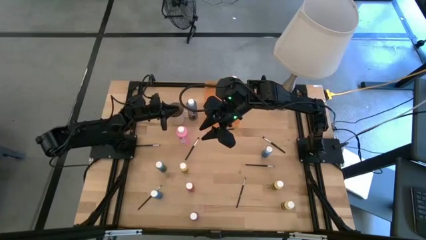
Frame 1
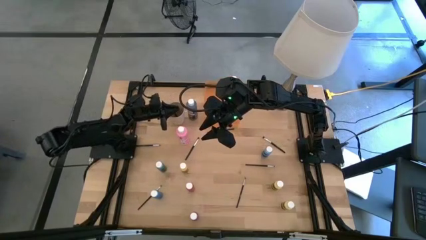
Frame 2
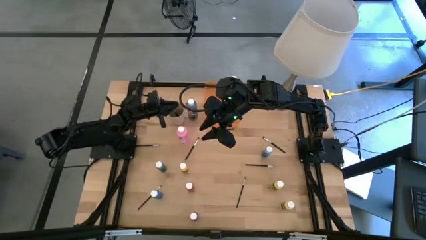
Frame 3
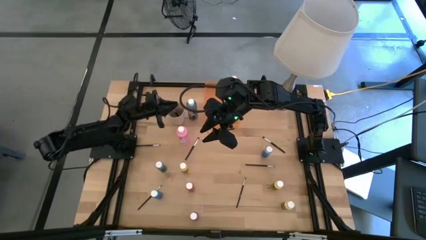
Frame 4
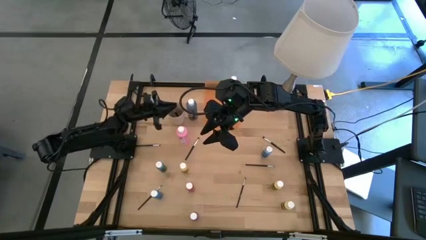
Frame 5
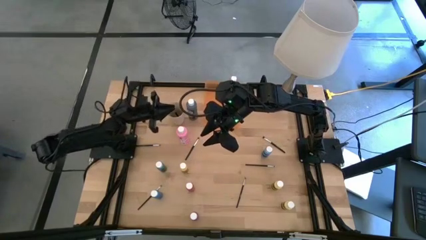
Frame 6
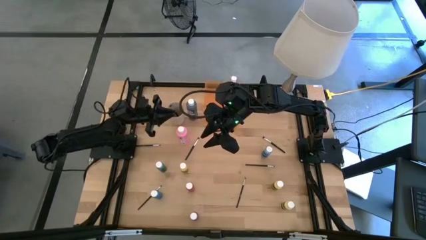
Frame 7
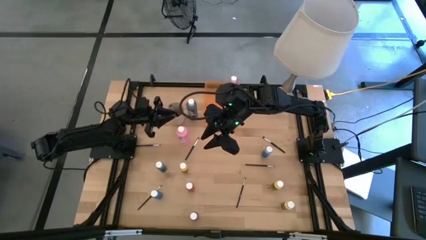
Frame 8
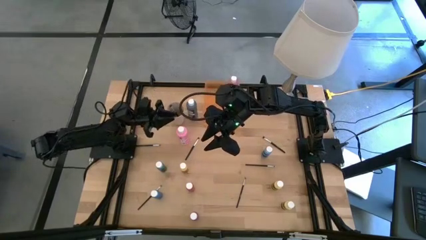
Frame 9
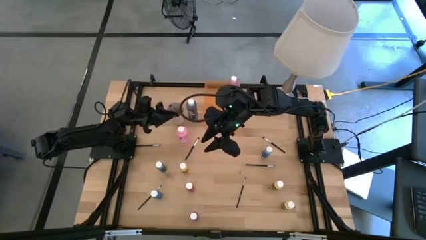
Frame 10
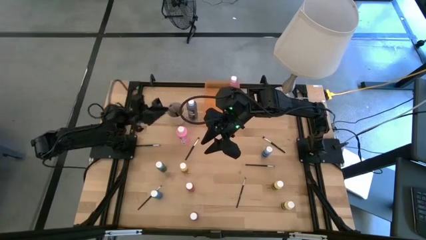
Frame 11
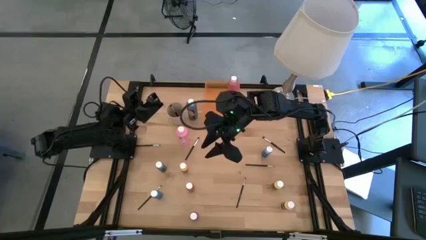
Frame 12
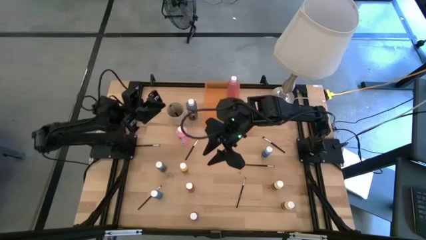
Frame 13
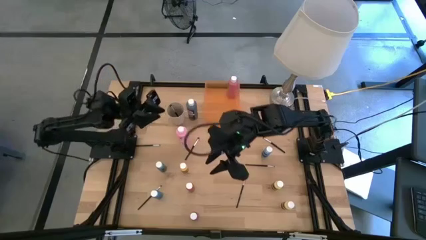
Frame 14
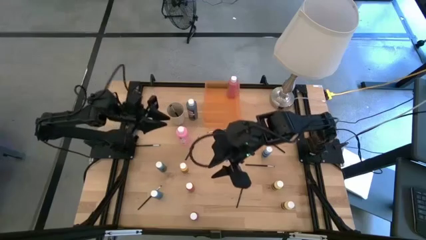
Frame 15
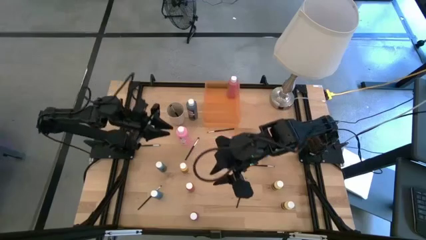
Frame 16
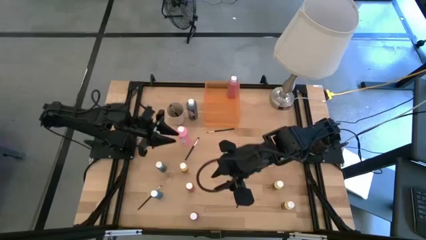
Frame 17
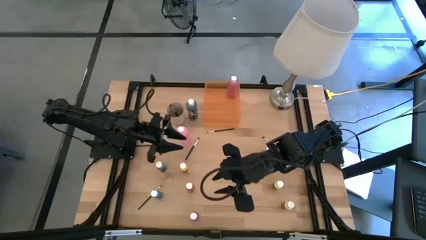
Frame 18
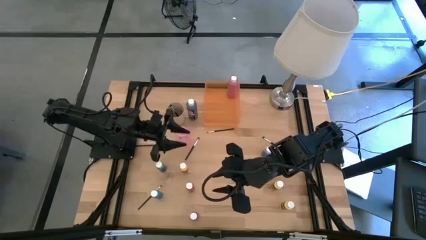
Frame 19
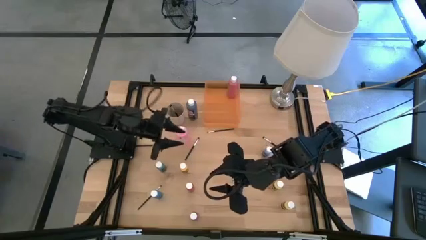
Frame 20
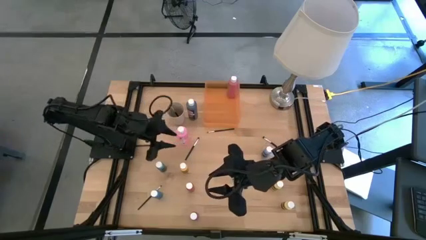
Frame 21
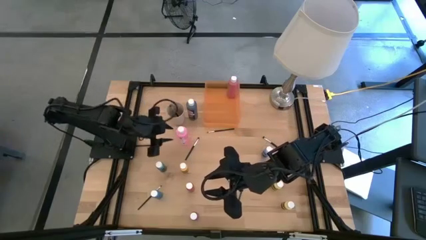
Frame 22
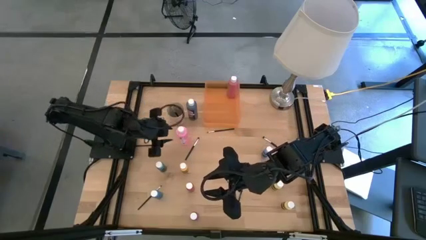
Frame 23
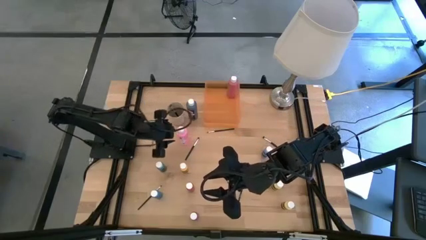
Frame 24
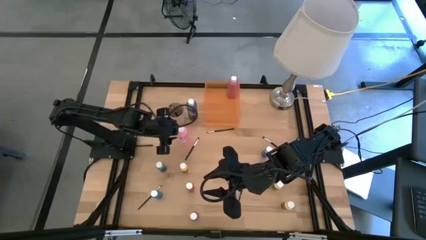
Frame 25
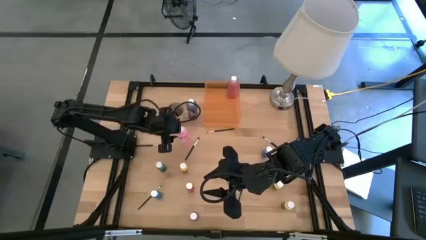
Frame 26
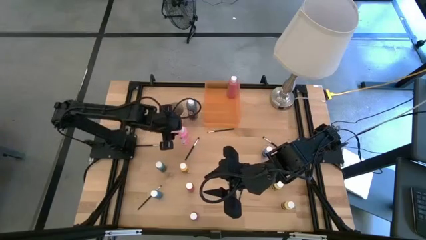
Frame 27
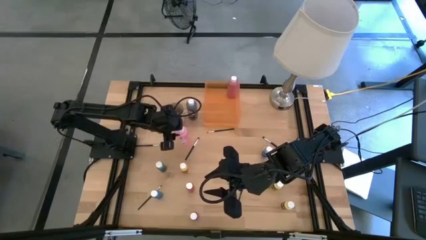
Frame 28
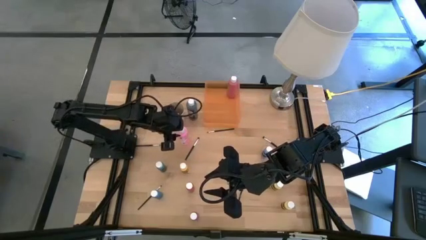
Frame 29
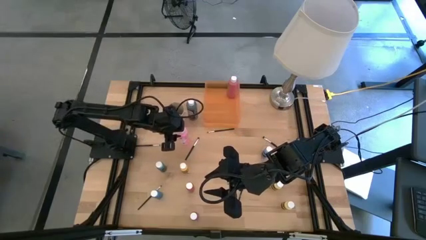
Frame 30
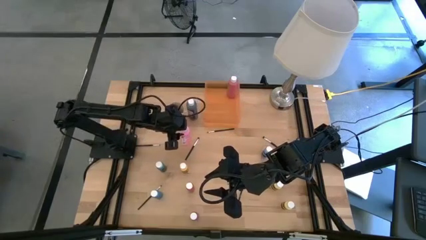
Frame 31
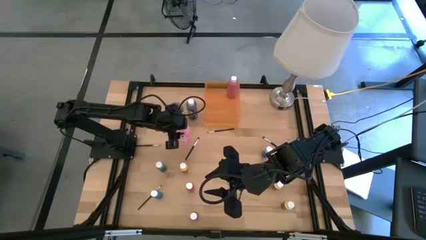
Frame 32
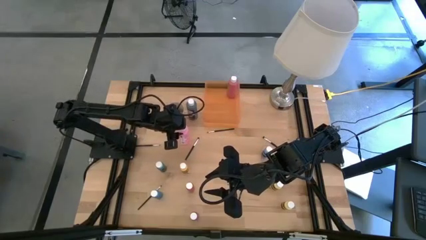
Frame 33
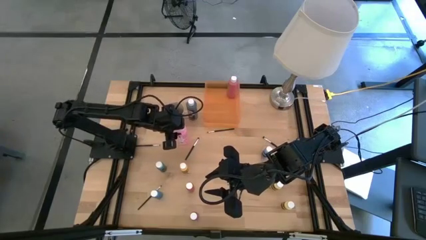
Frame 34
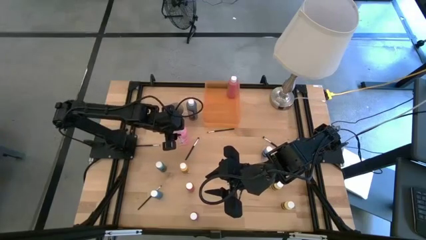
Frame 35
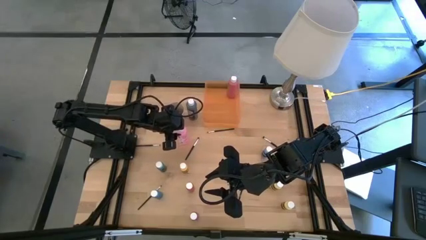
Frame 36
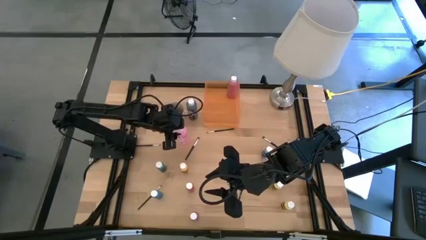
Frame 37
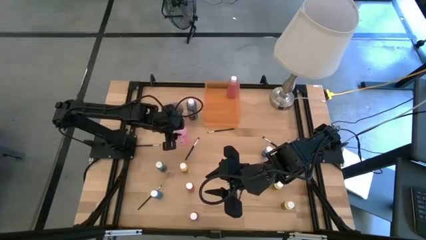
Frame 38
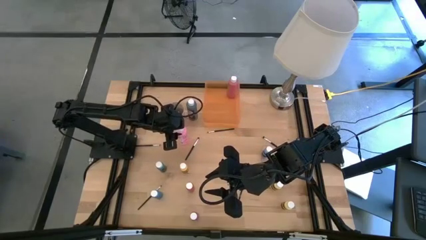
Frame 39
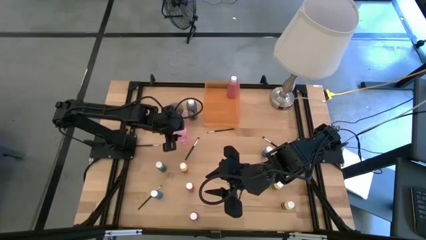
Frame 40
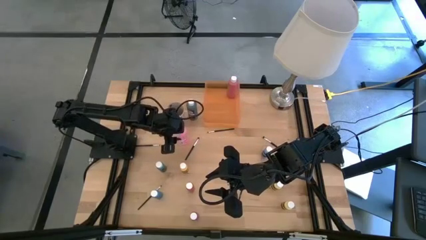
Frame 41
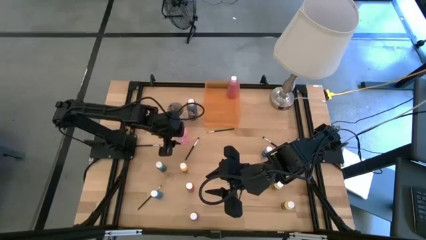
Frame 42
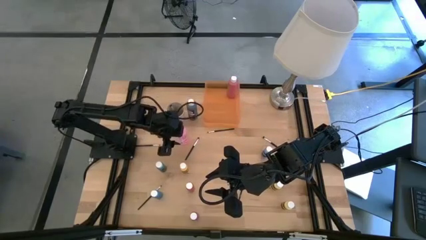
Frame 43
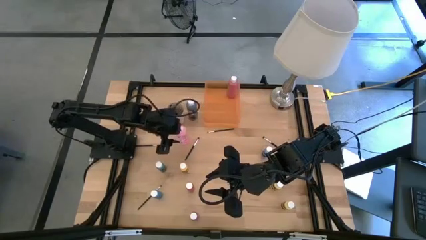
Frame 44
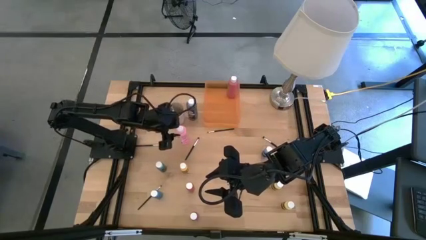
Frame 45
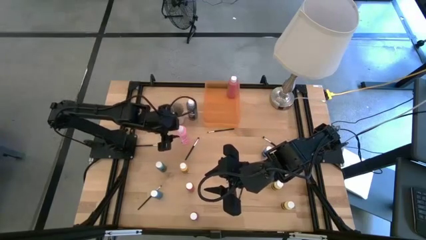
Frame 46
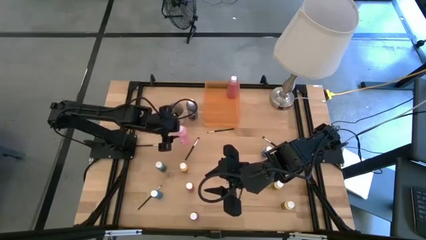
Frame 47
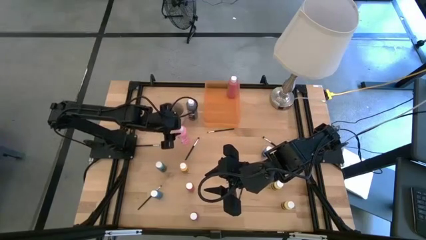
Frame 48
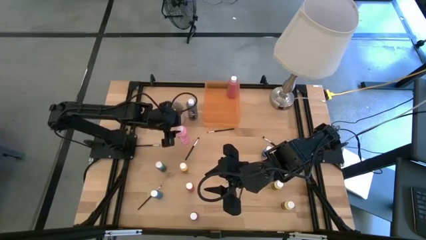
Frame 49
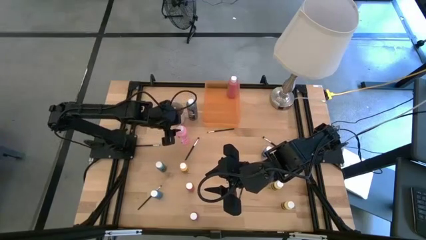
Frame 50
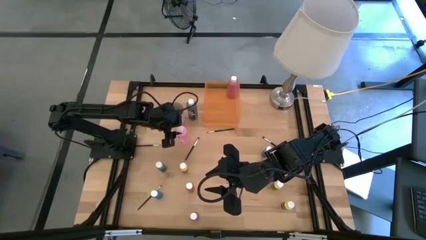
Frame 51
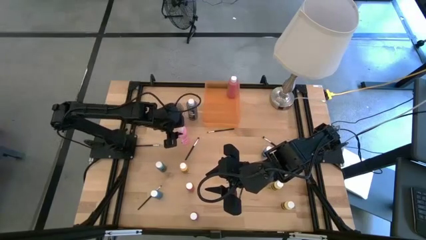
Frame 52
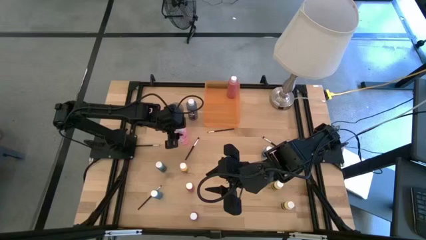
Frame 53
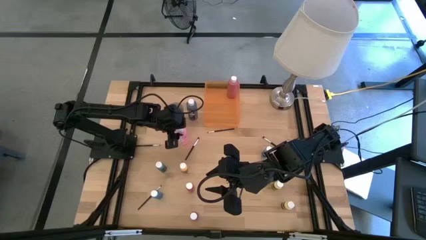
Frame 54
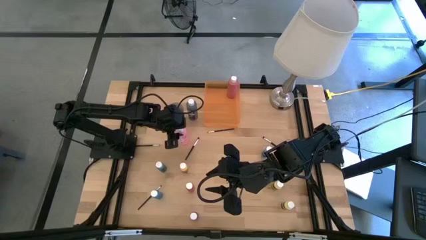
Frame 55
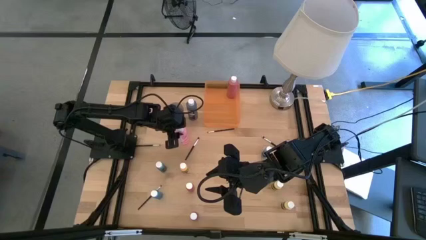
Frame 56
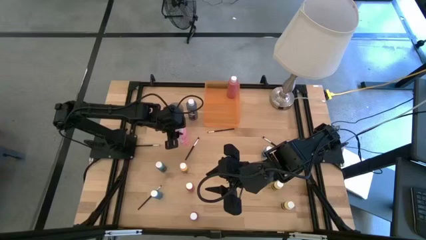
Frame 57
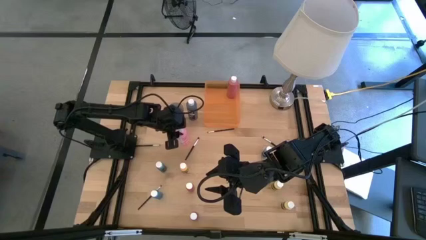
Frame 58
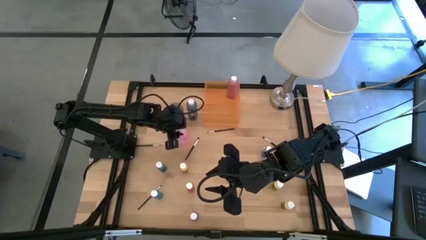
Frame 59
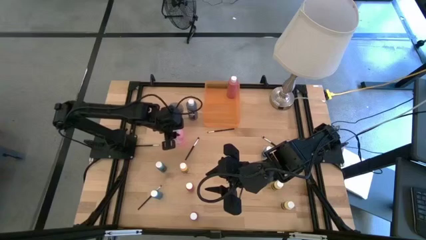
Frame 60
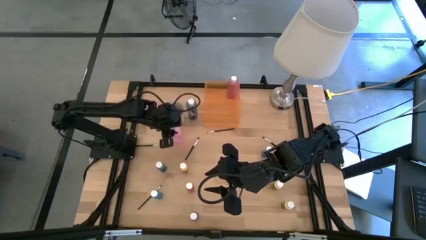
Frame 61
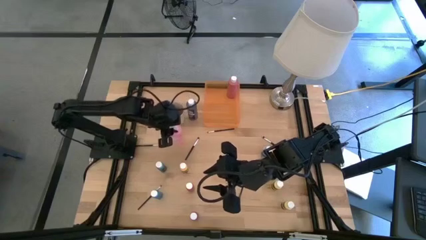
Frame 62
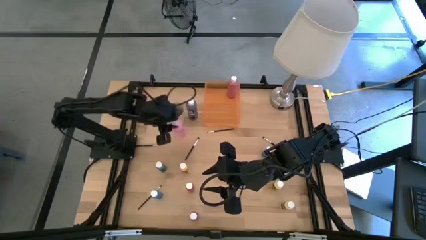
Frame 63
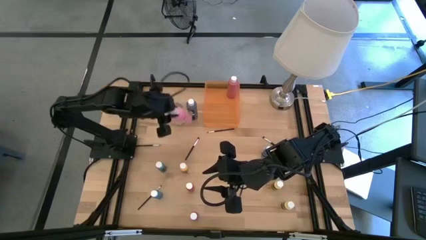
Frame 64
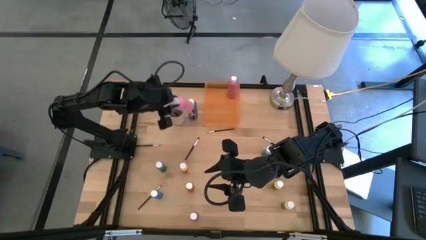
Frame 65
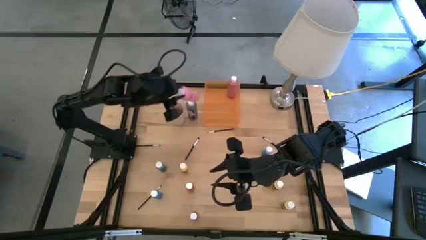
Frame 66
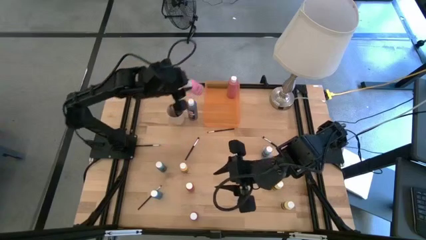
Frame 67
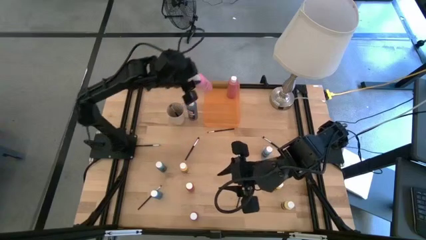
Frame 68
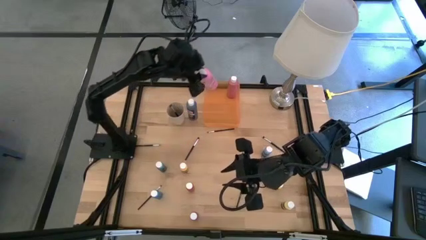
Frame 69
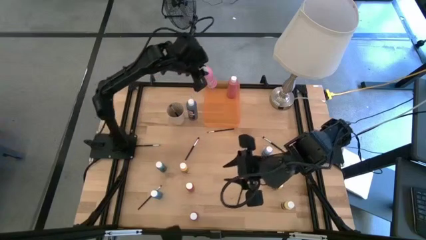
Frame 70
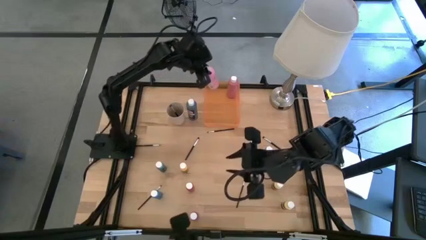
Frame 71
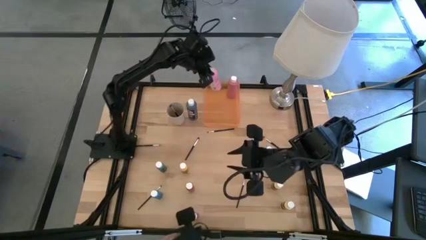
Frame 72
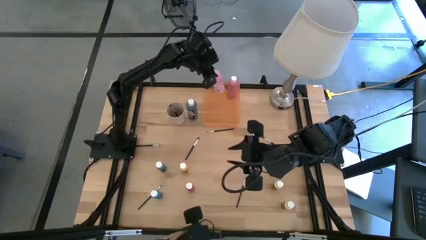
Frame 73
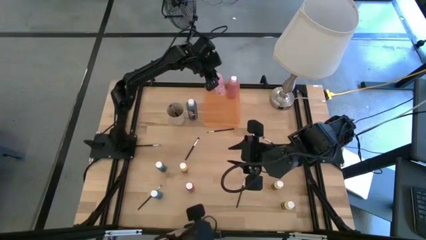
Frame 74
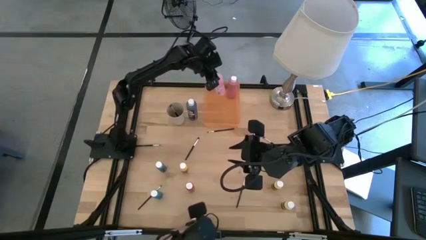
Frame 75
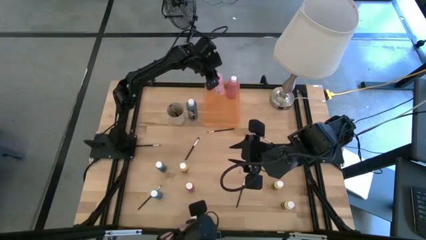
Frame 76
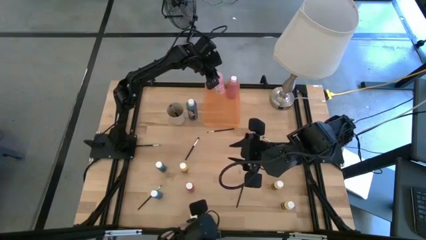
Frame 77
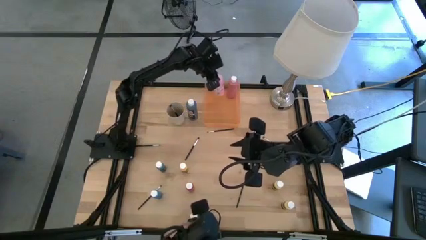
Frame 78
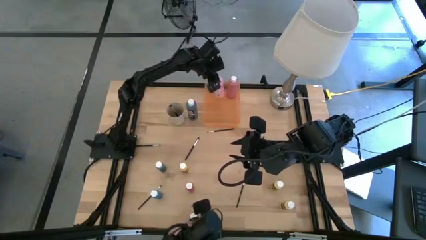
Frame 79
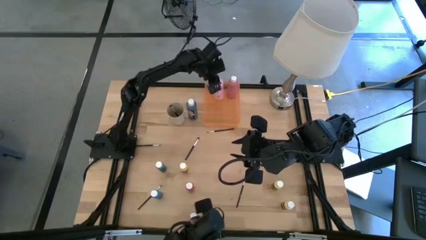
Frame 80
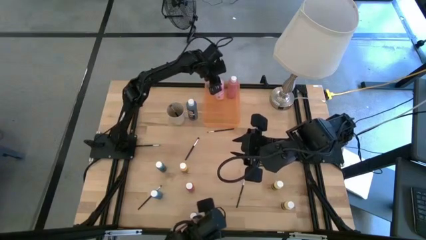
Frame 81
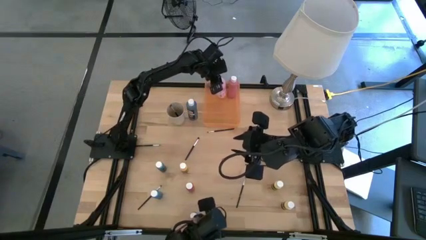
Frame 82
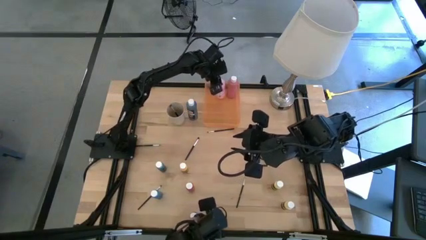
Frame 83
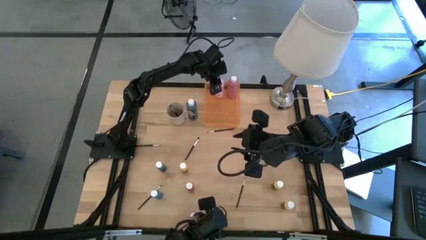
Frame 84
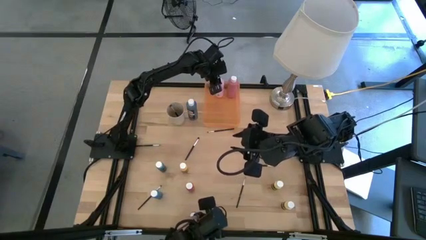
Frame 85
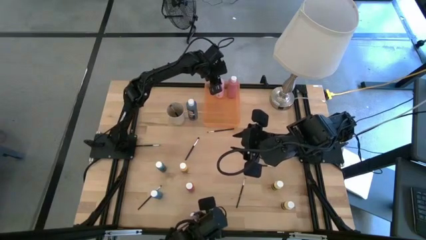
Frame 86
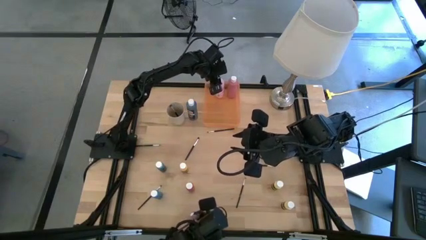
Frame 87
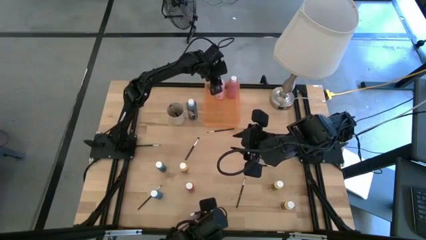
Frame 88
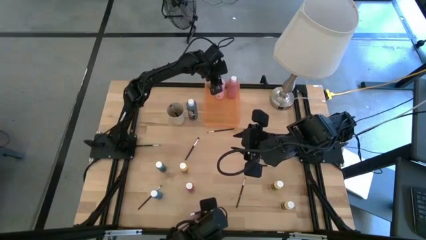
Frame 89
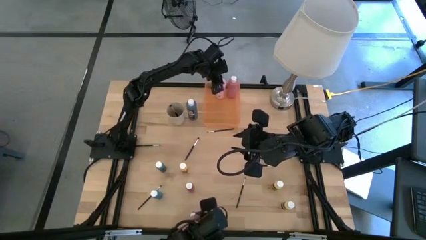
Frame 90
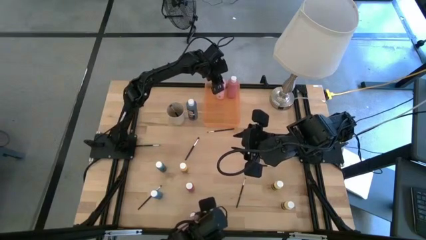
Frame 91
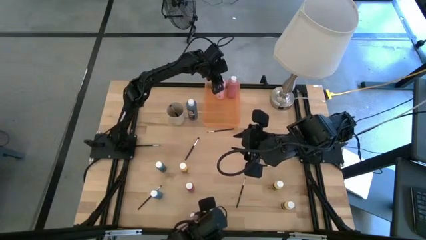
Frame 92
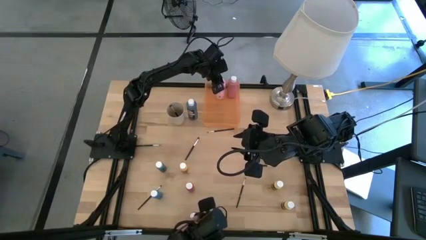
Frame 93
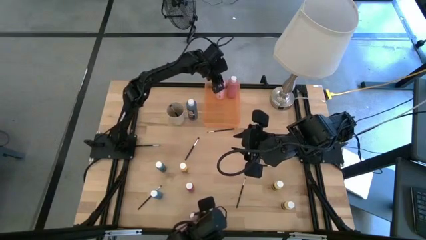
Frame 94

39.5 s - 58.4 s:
Task: Pick & Place Paint Supplies
Put the pink paint bottle into the orange bin
